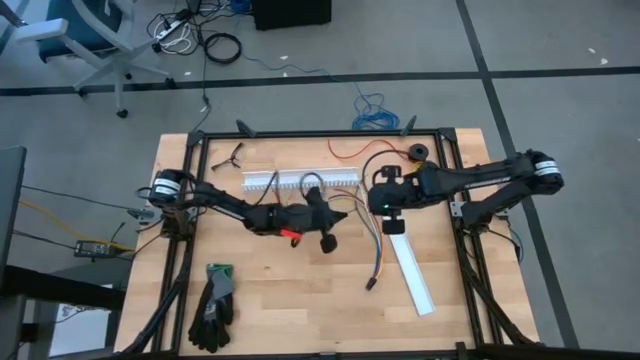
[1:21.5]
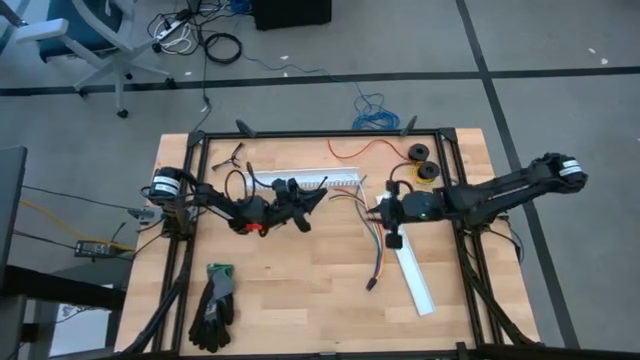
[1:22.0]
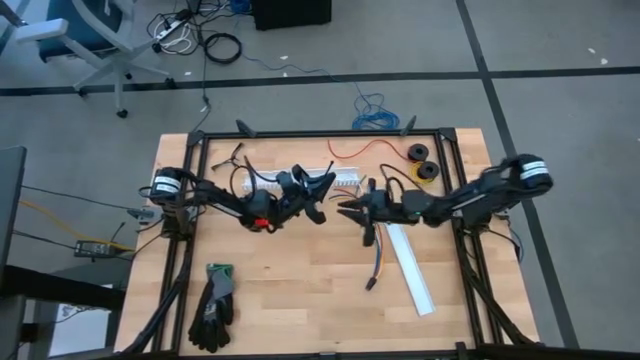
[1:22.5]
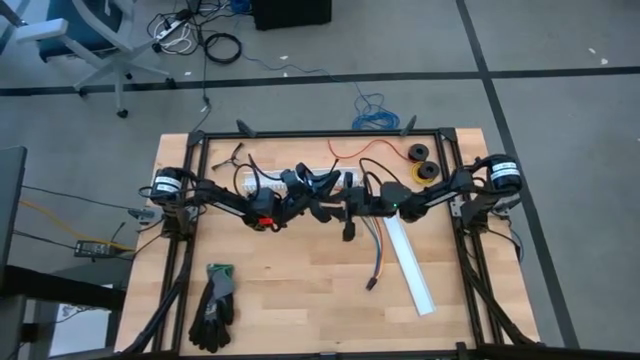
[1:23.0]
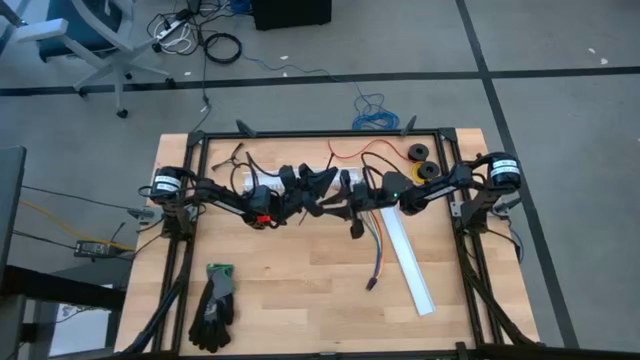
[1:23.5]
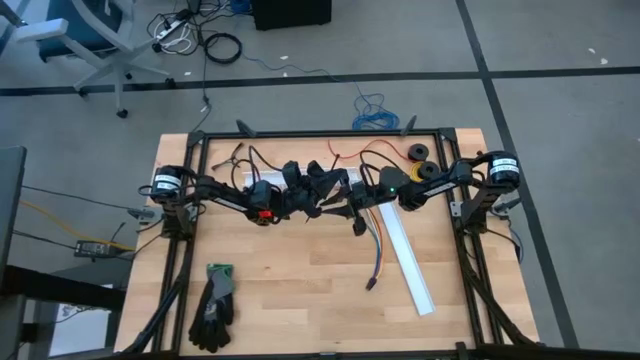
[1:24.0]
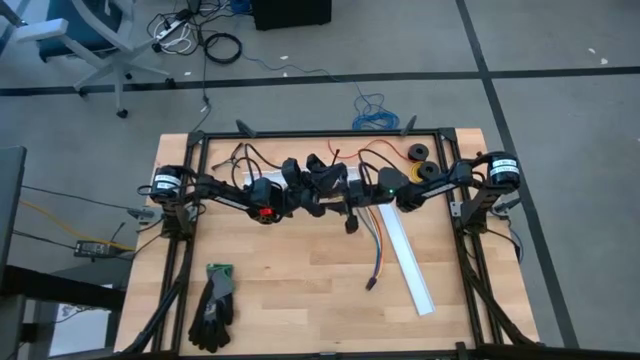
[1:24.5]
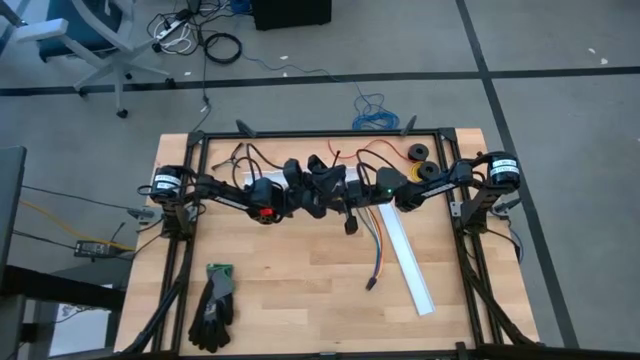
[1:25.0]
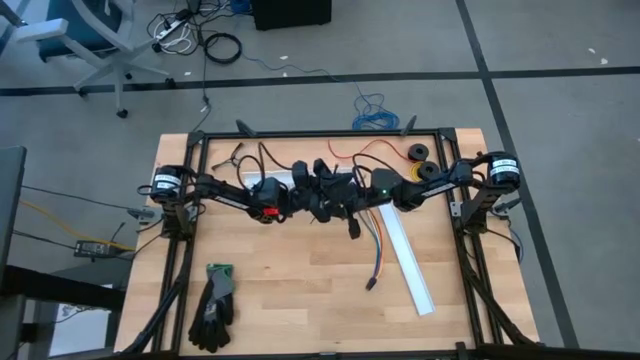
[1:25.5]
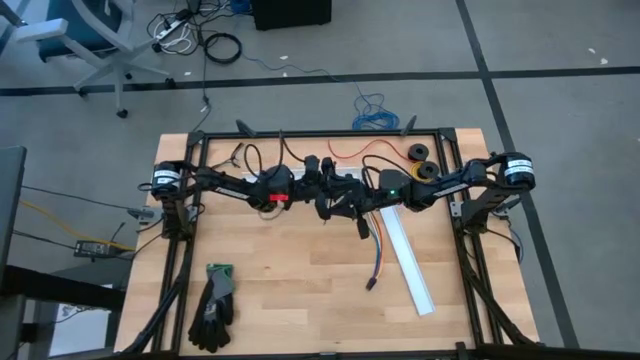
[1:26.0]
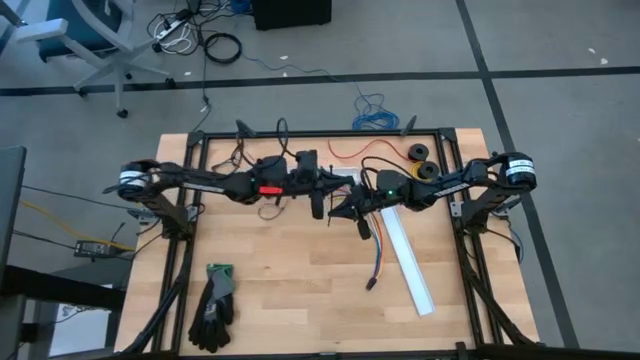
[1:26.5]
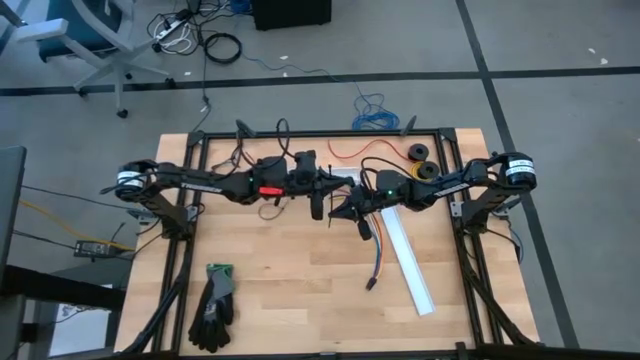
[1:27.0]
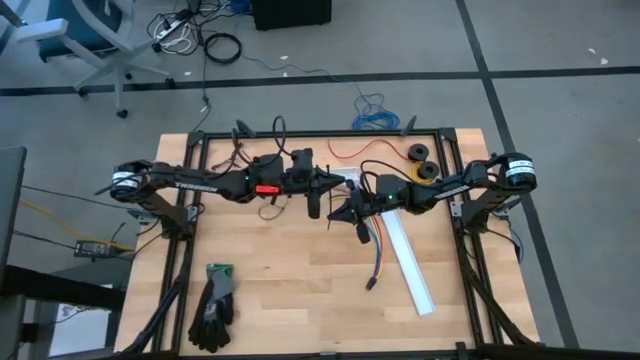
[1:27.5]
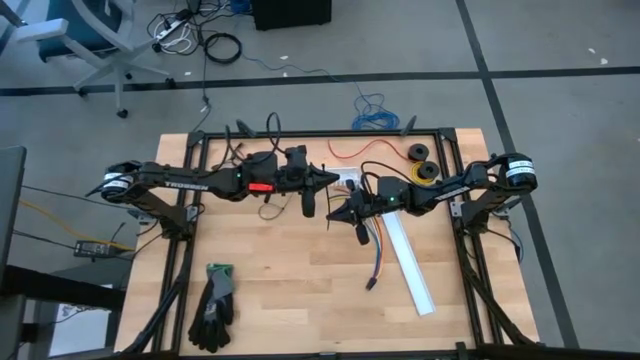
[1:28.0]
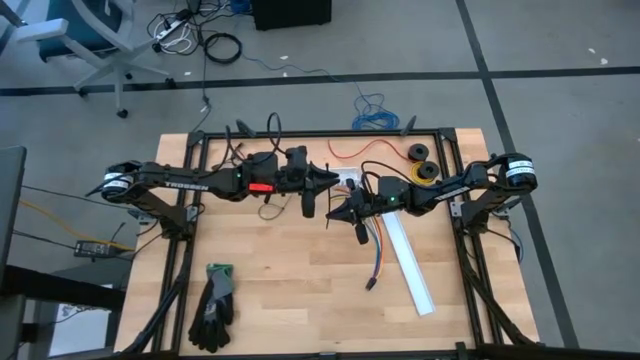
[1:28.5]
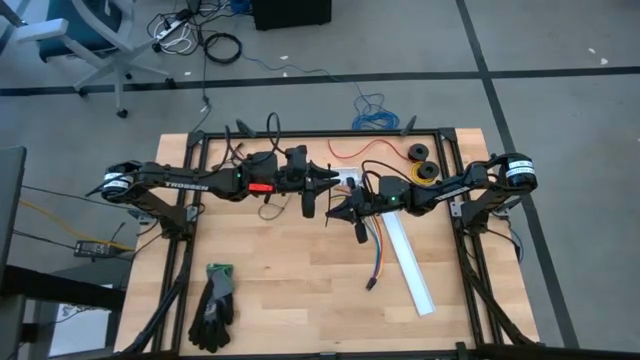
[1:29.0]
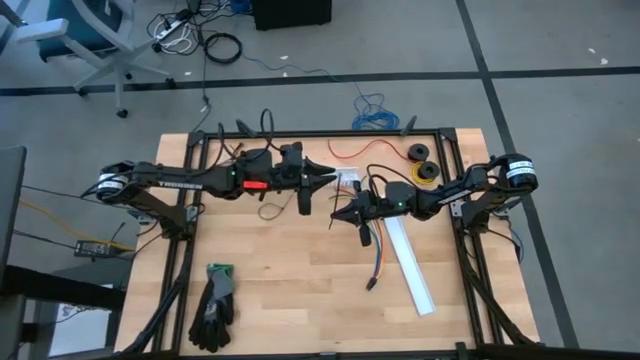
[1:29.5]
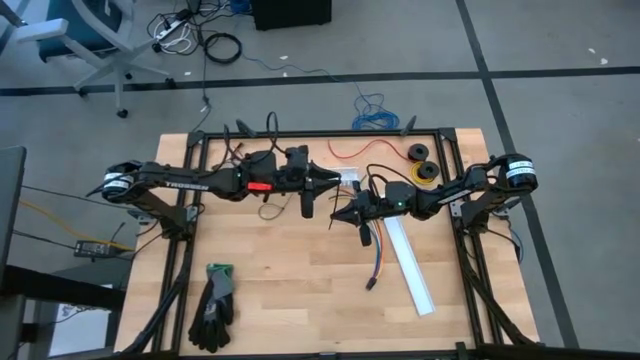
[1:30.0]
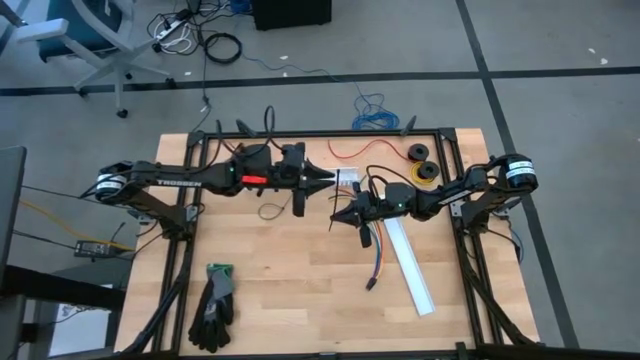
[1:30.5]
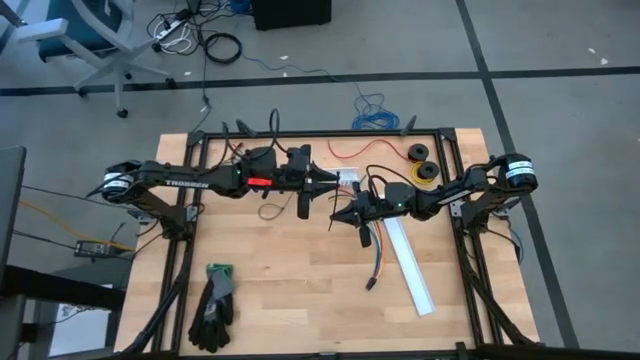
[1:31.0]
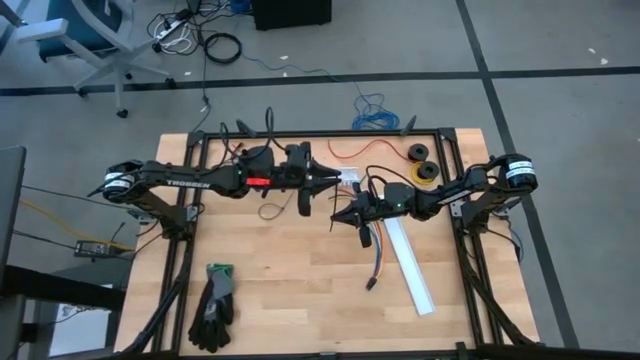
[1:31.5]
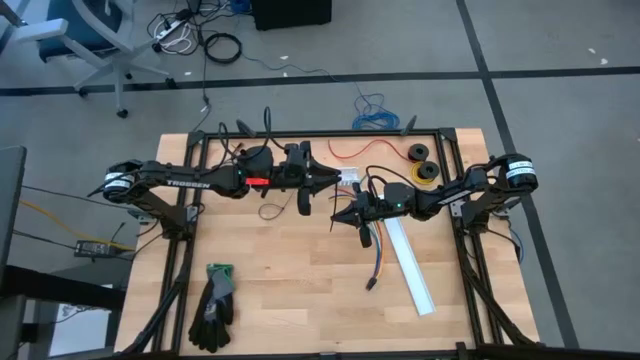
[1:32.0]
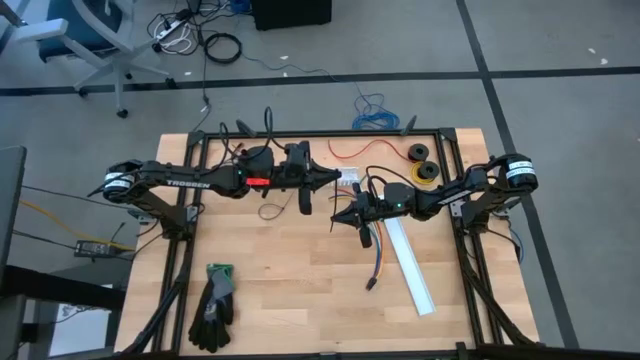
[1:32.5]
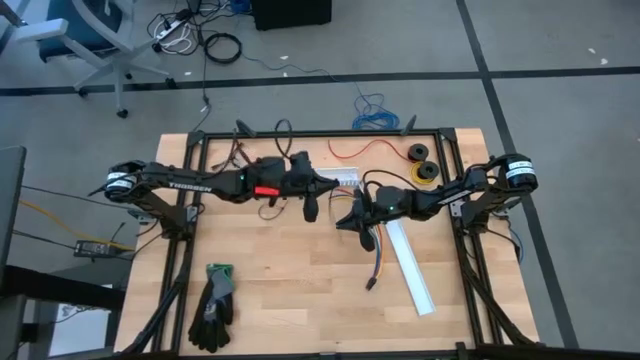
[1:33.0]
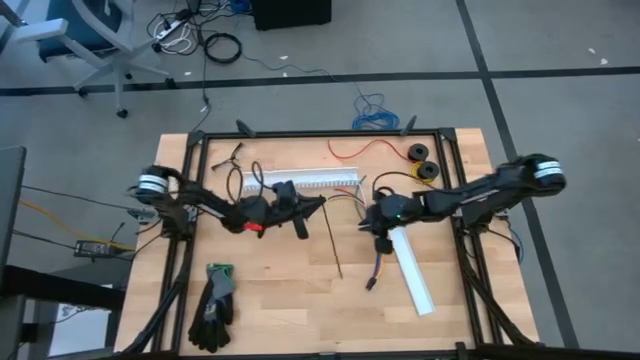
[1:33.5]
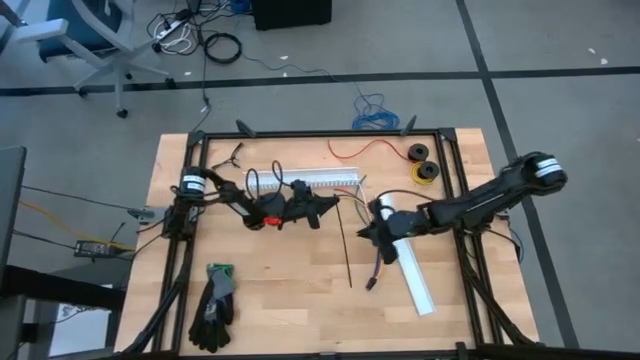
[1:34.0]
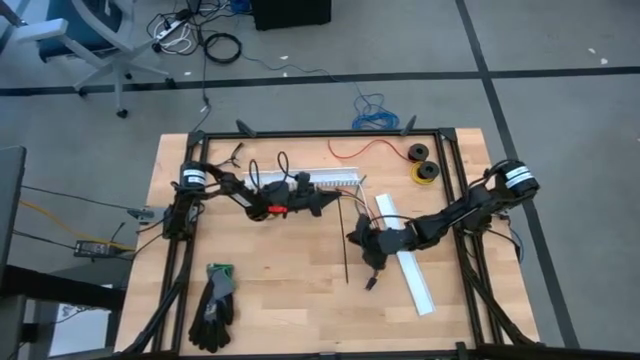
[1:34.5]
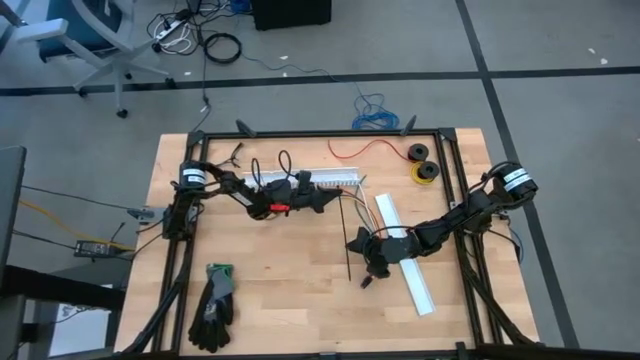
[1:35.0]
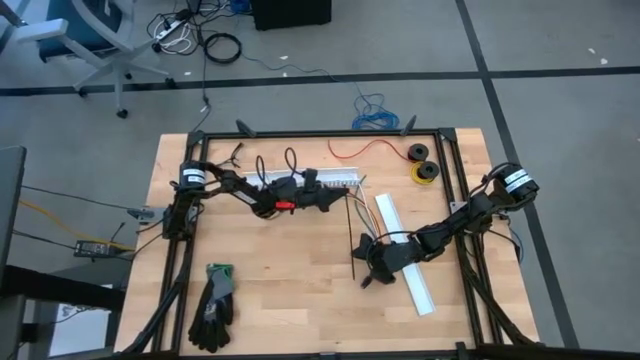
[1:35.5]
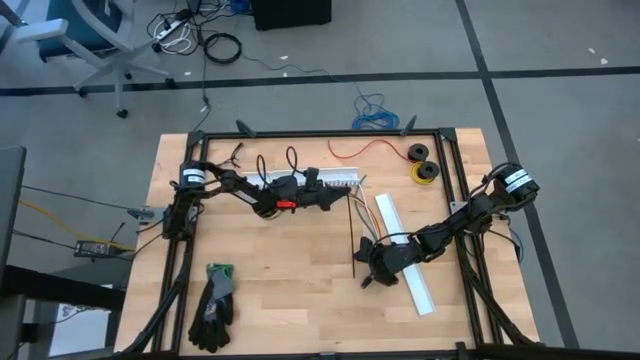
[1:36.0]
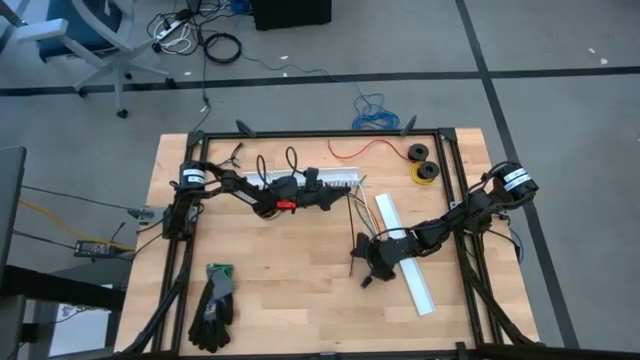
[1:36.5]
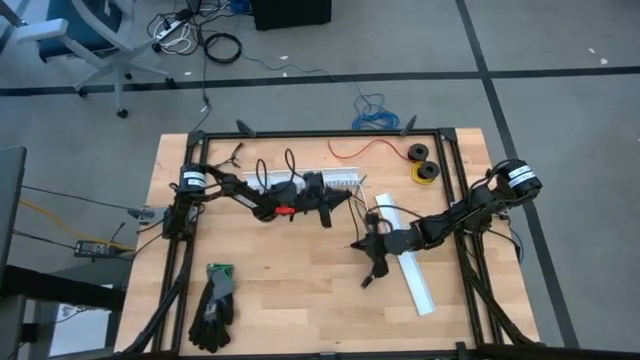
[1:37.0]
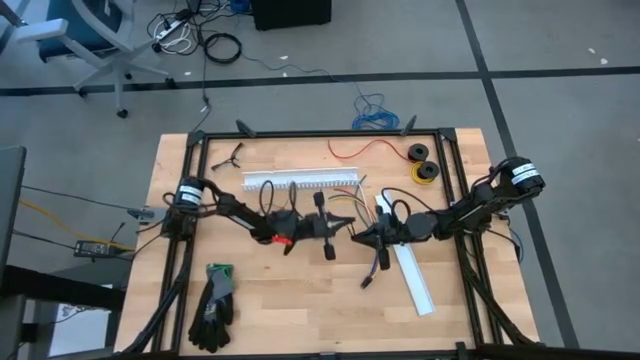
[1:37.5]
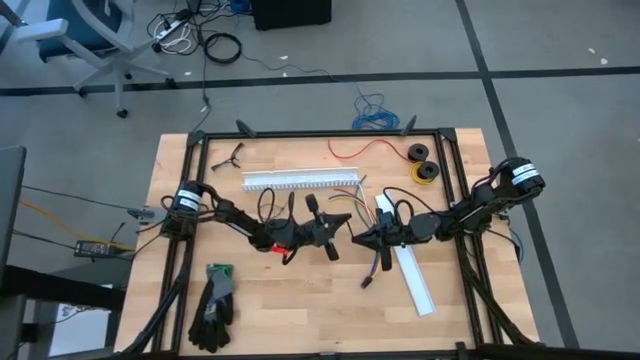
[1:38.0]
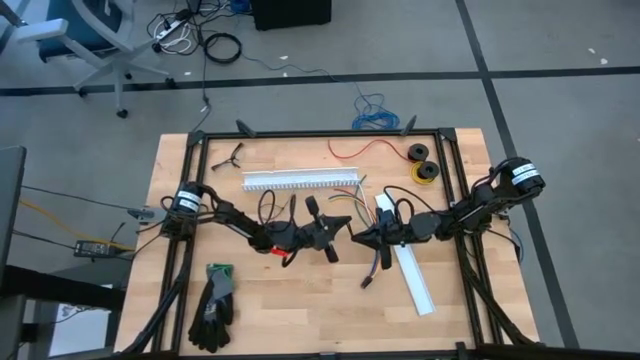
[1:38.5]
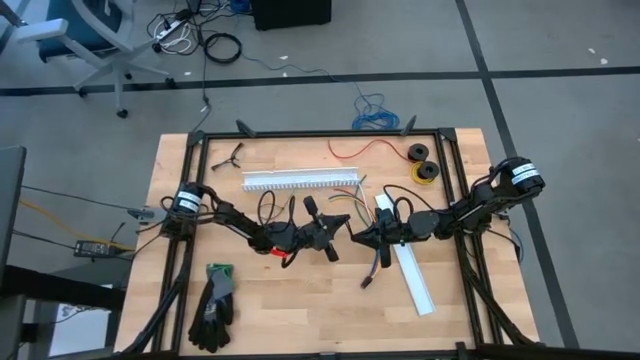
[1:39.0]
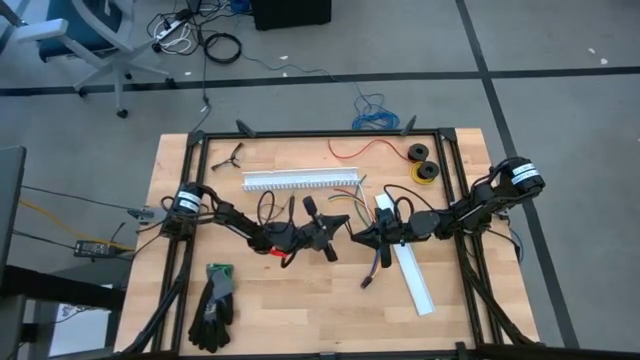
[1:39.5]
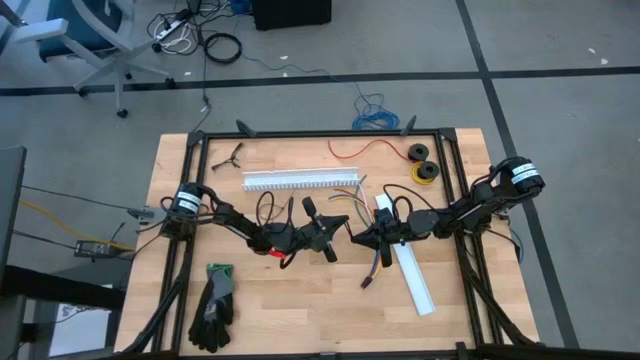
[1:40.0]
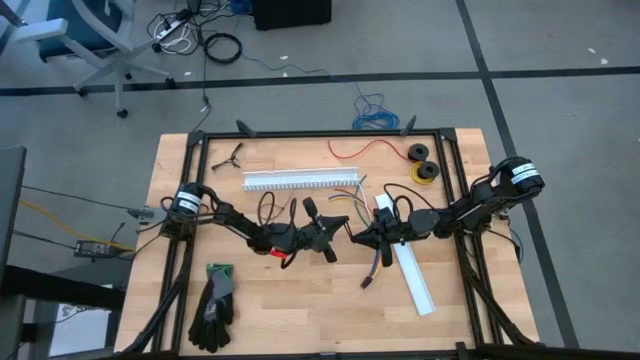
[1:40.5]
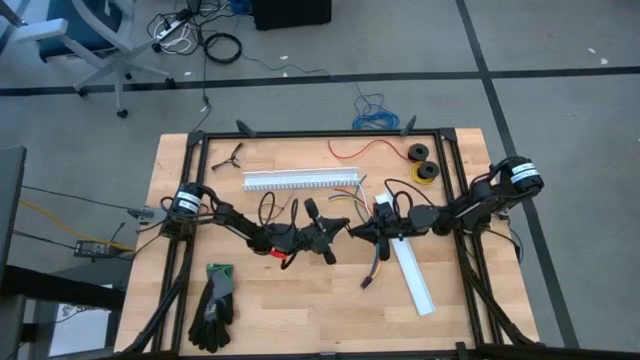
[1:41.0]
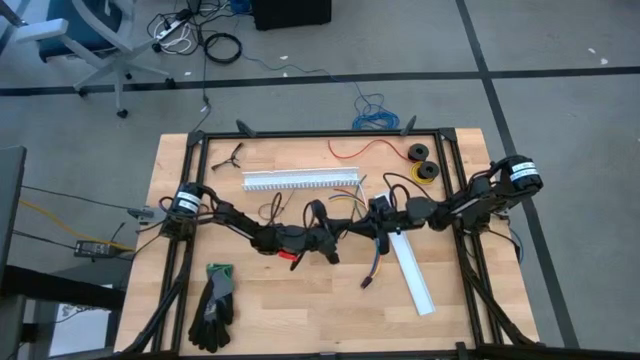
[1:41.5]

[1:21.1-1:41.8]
Task: Ziptie cables
Wrap the cable wires with black zip tie

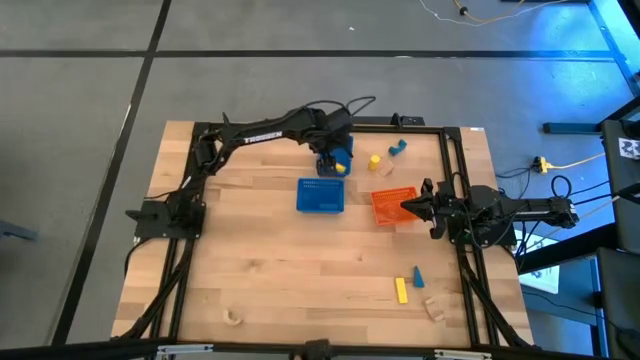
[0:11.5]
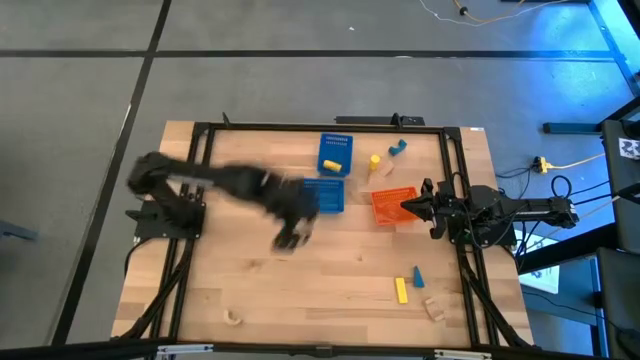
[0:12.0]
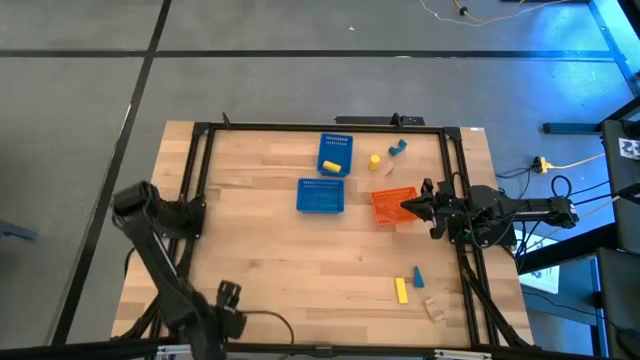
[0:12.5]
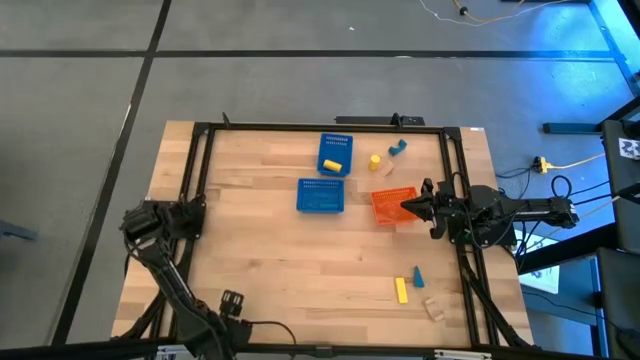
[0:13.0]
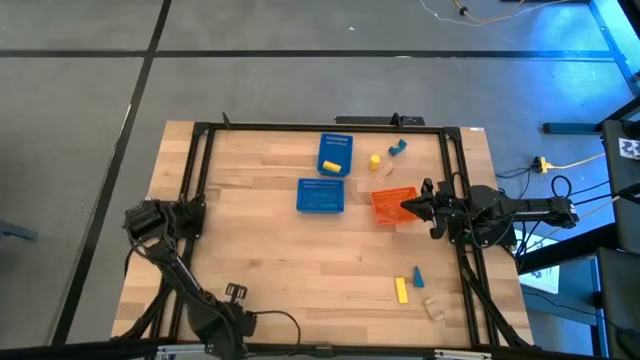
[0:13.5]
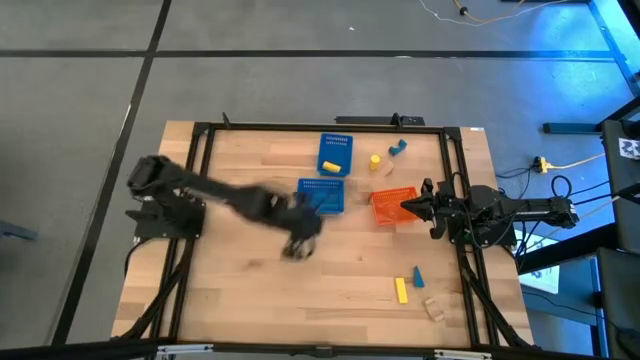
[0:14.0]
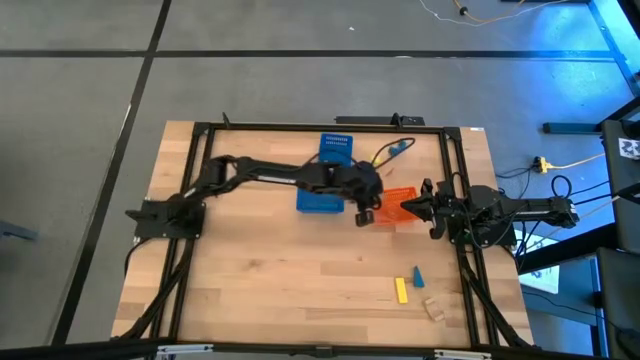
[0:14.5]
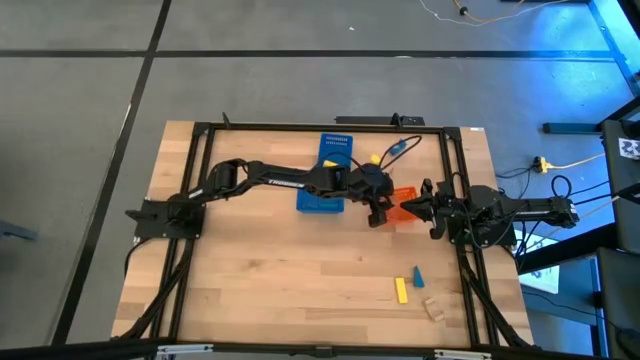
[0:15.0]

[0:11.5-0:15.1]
Task: Sort & place blocks by color
Put the bottom left light brown block into the orange basket
